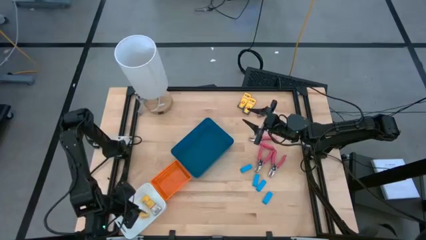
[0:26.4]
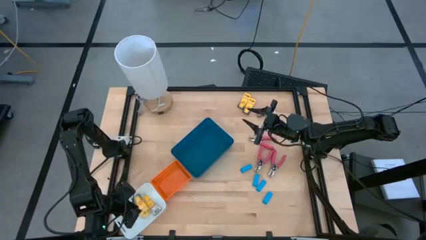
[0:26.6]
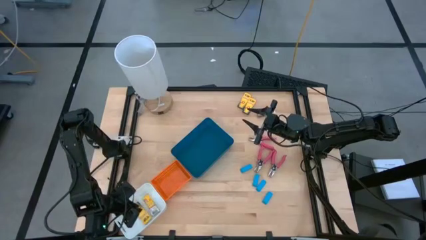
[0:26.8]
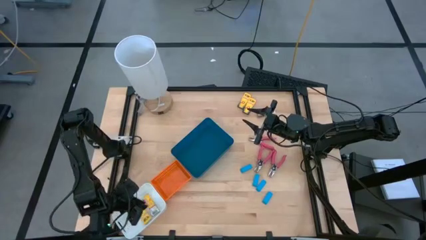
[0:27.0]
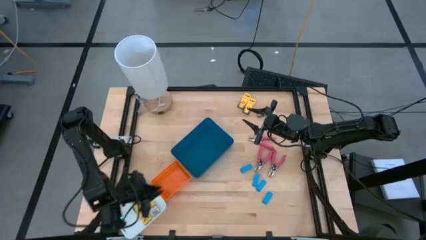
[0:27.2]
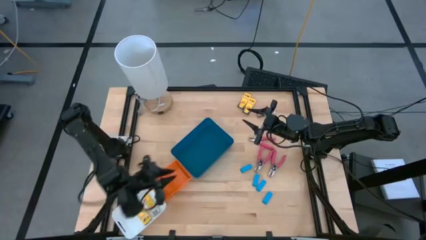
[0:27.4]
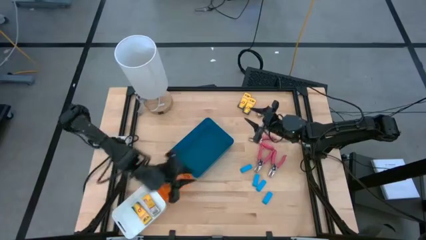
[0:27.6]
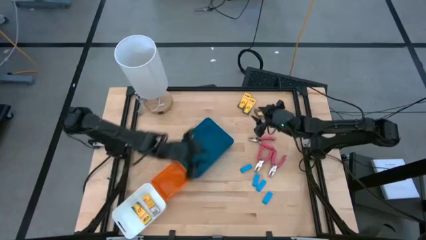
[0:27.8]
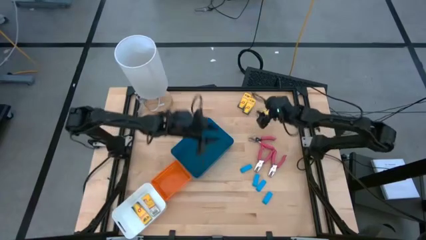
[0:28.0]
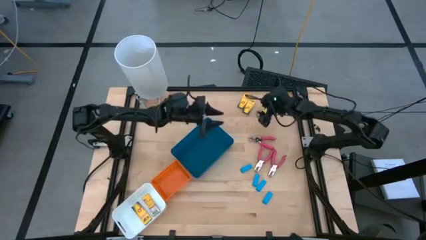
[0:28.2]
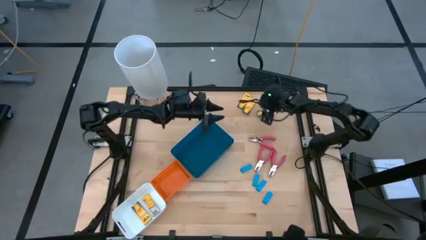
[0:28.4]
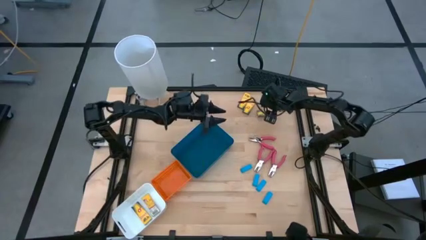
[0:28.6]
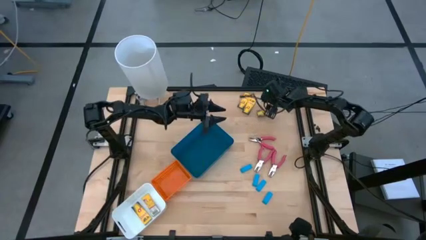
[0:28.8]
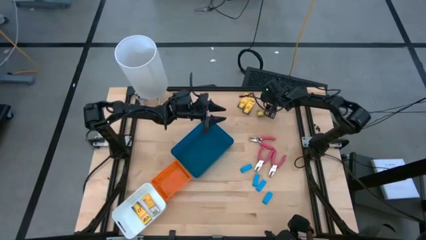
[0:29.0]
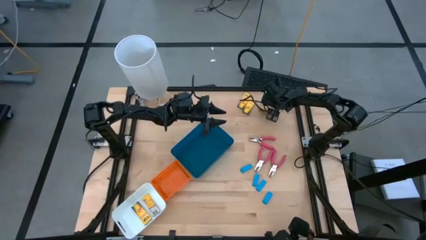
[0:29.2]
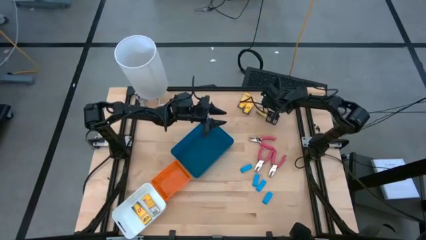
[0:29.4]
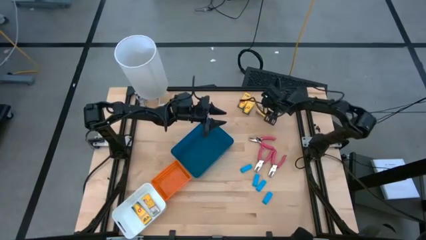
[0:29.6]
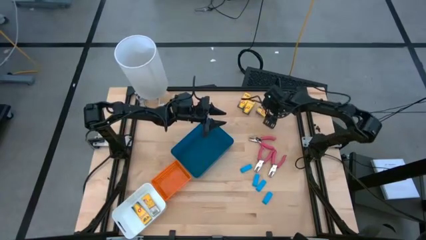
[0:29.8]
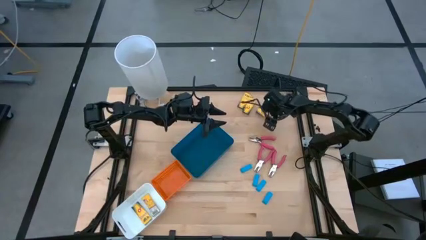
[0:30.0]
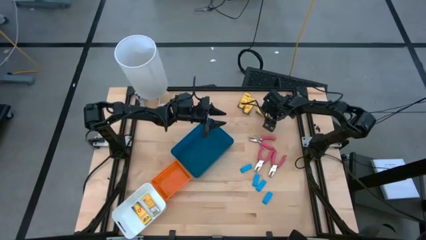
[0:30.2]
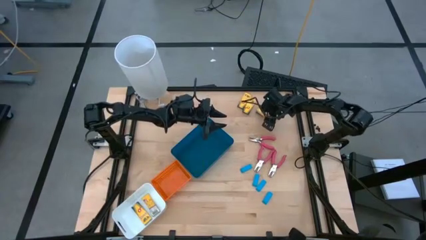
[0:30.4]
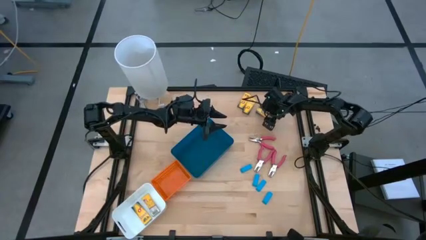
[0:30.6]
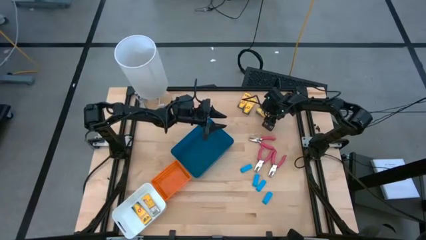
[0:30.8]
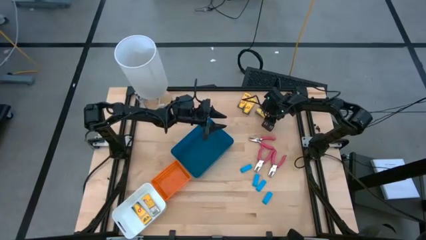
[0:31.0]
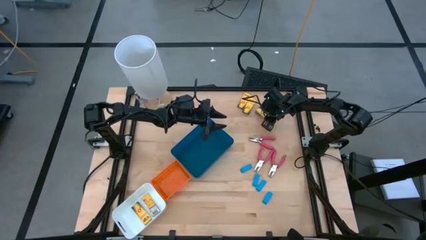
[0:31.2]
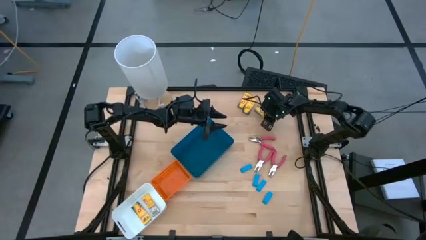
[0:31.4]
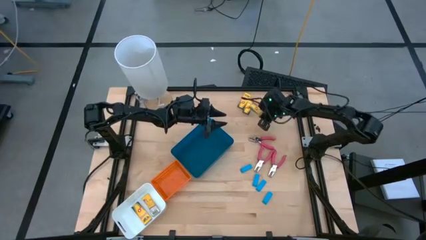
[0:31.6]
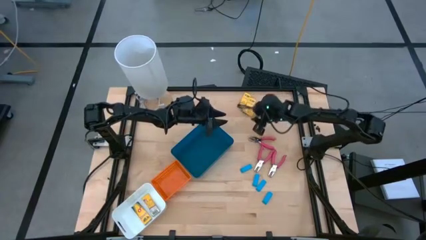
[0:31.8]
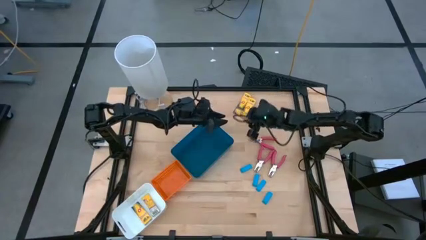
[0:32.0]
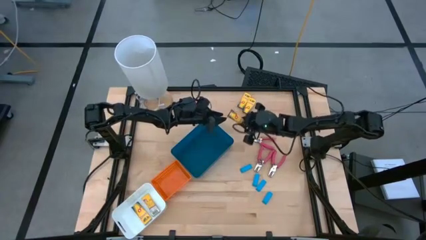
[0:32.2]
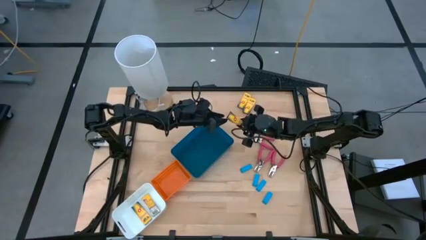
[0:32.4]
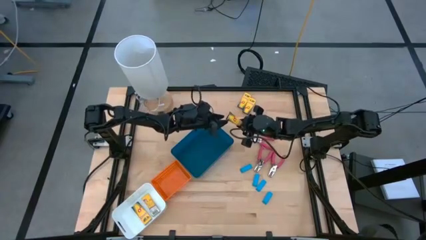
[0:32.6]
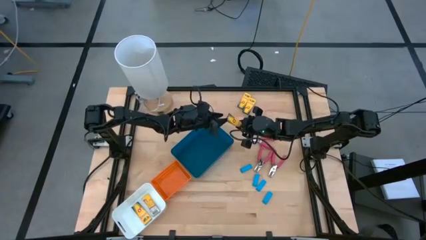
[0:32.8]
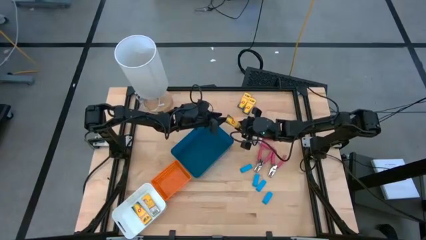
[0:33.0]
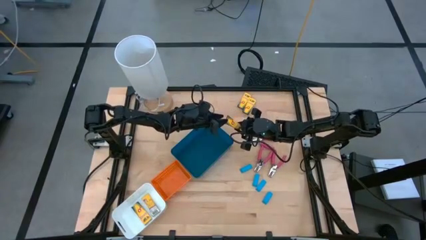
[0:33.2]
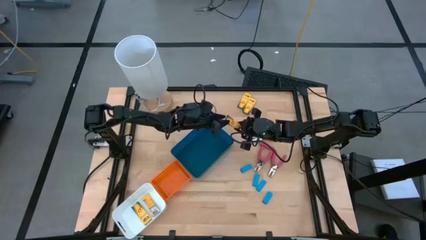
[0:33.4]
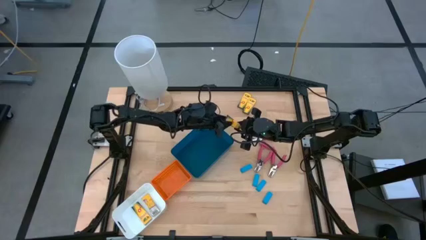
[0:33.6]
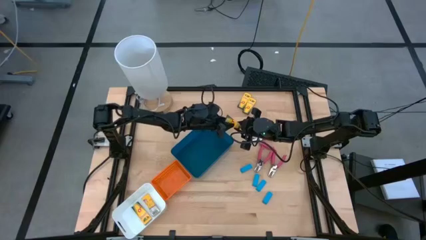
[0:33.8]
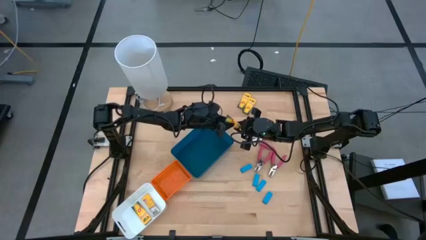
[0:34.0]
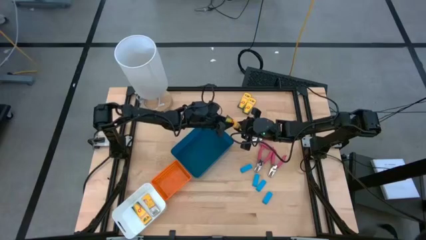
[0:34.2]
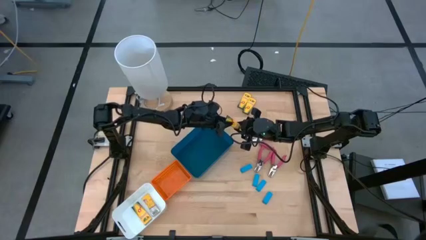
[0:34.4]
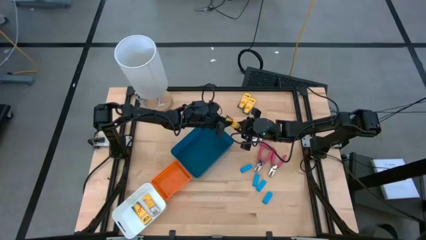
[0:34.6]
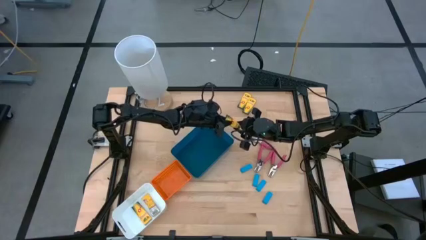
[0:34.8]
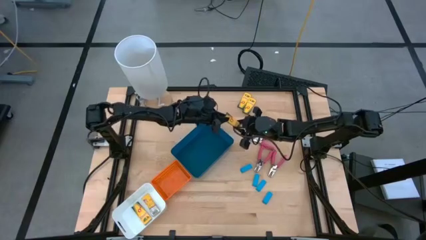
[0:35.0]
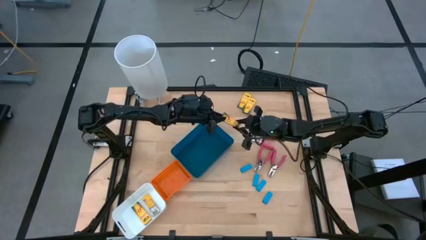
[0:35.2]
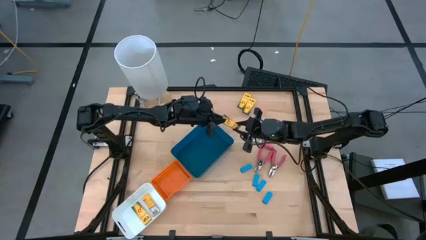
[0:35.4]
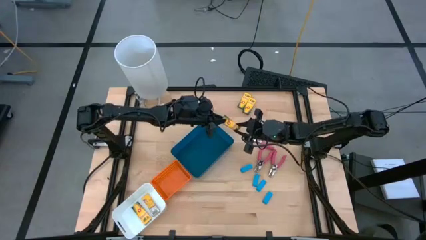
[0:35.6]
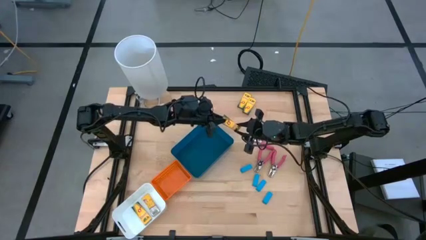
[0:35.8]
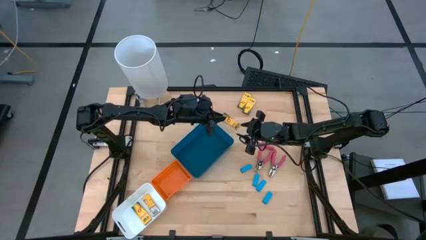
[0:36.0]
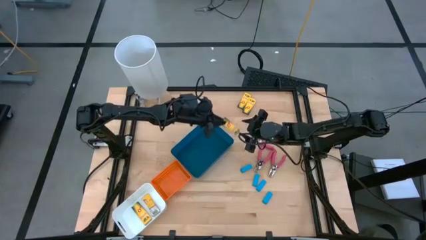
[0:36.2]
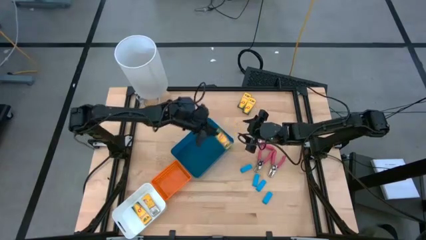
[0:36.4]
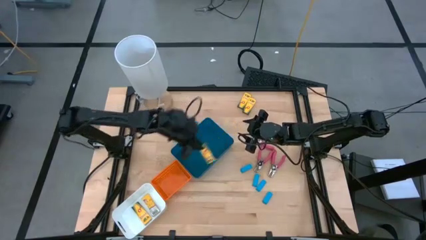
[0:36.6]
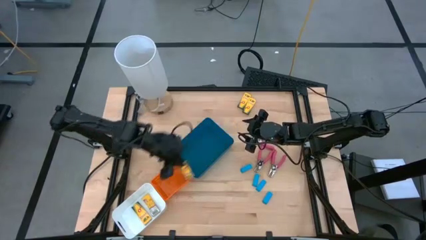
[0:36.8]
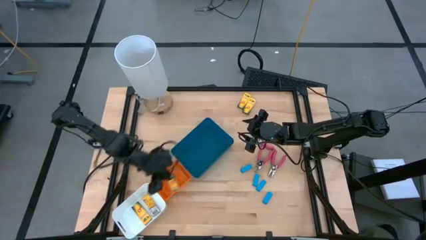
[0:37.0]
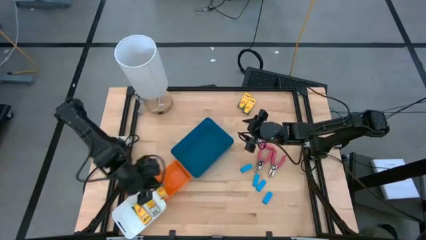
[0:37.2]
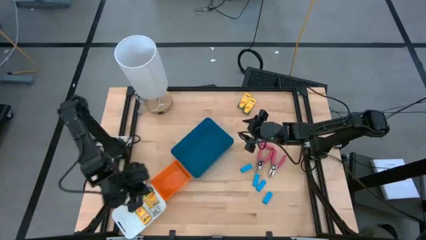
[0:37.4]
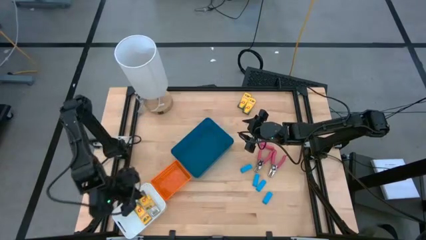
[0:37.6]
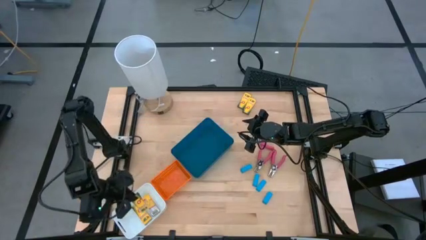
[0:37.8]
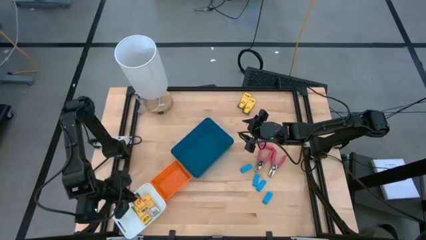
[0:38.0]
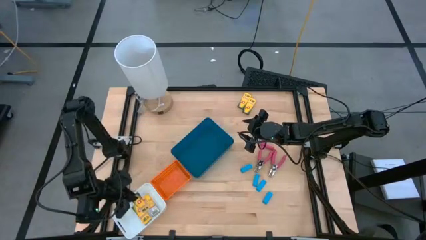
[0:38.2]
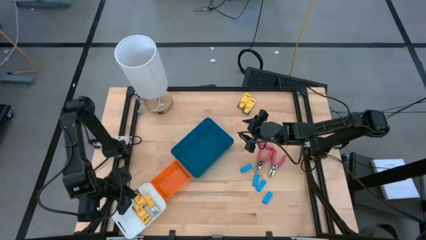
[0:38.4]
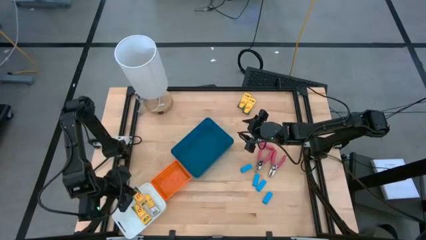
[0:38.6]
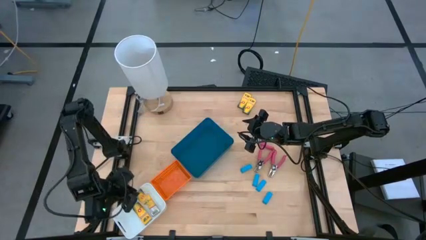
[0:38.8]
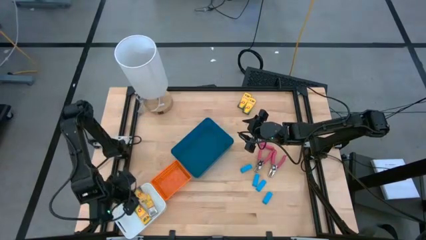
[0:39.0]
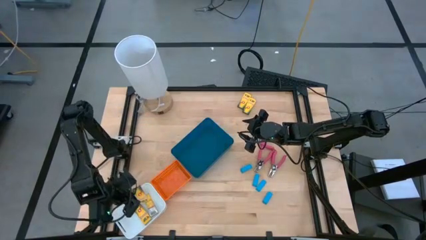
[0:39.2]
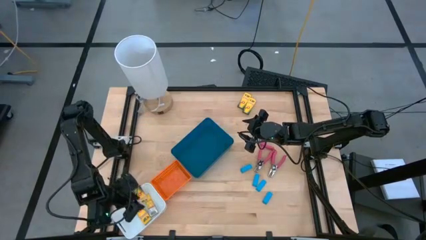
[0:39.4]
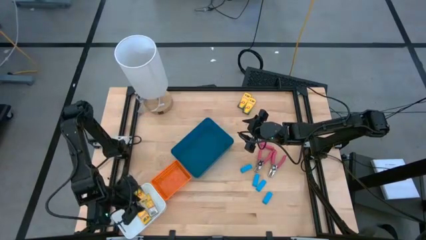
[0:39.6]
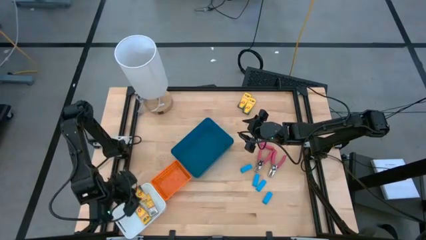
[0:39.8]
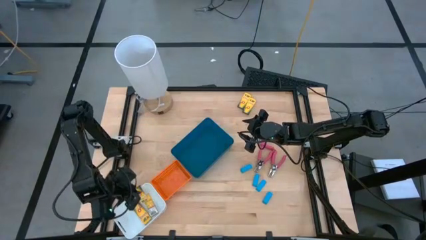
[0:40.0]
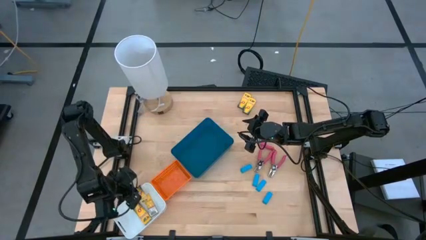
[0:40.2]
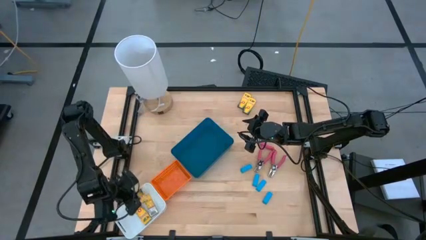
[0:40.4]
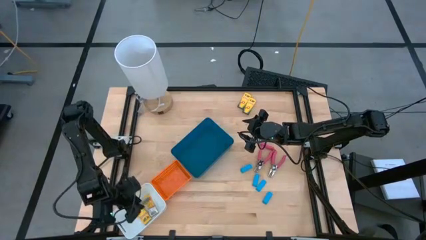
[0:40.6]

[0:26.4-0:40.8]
Task: Pick & Place School Supplies
Put the yellow crayon box into the white bin

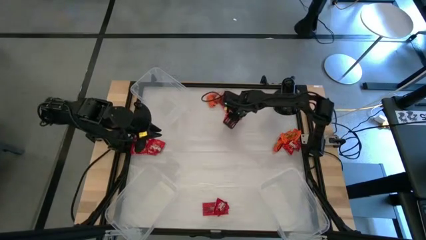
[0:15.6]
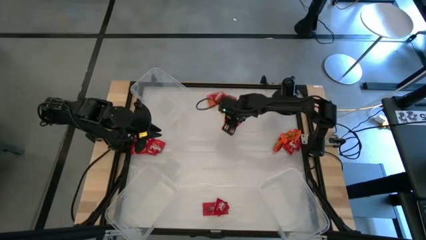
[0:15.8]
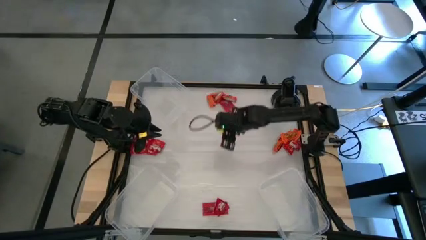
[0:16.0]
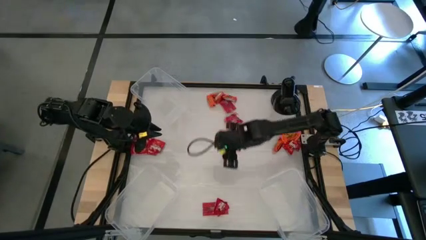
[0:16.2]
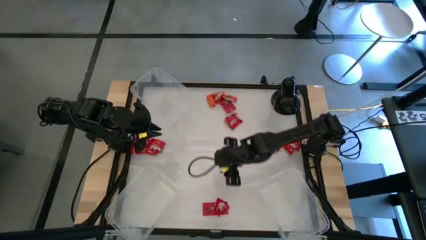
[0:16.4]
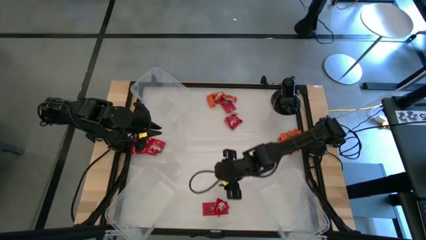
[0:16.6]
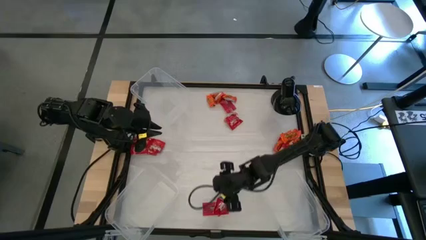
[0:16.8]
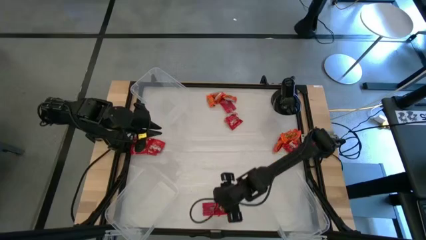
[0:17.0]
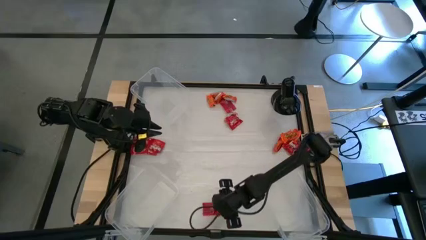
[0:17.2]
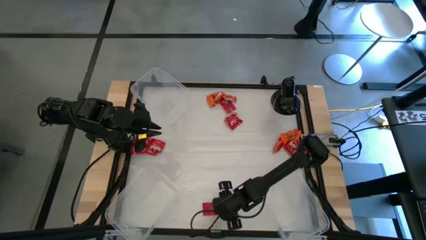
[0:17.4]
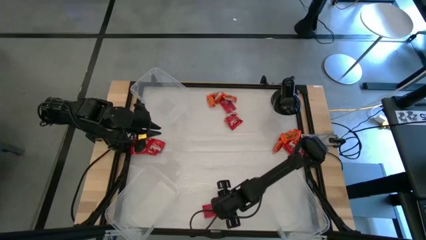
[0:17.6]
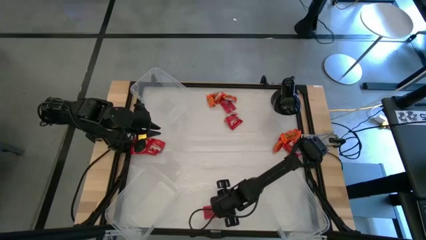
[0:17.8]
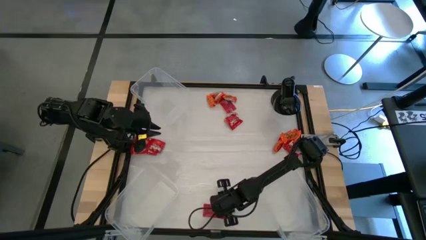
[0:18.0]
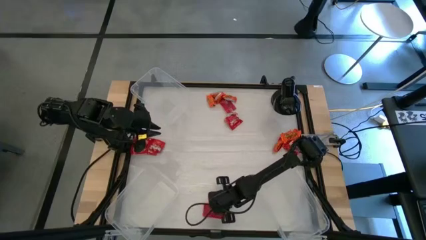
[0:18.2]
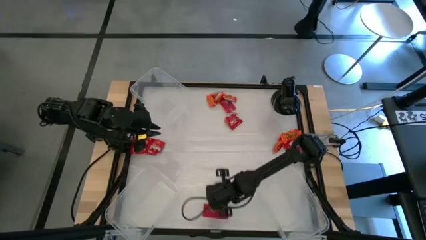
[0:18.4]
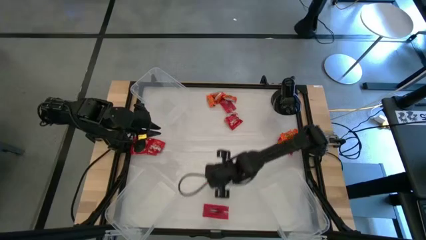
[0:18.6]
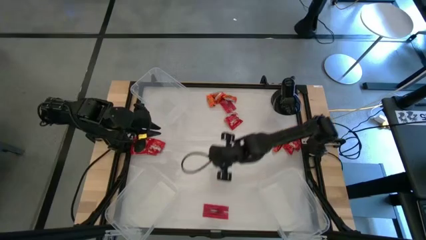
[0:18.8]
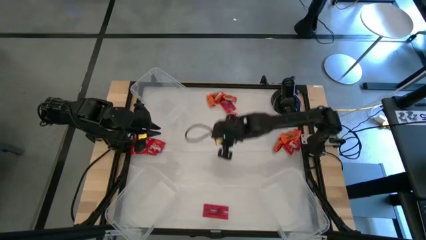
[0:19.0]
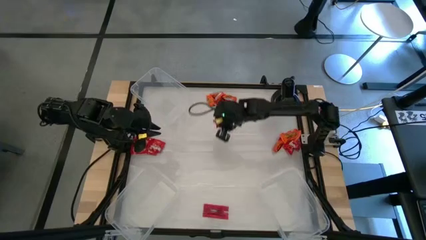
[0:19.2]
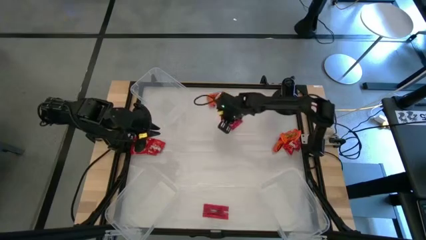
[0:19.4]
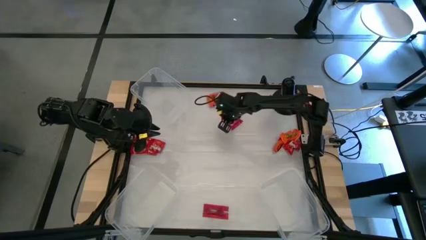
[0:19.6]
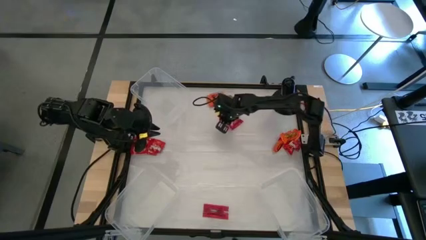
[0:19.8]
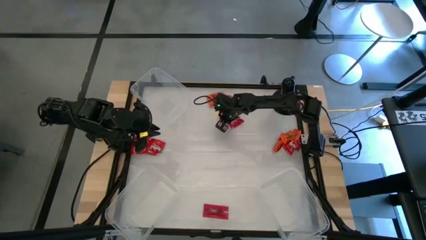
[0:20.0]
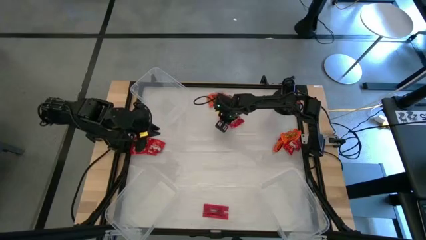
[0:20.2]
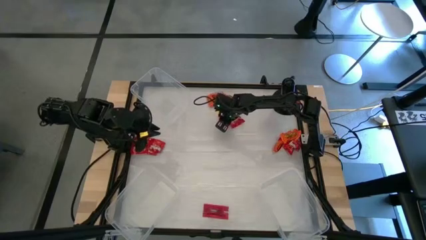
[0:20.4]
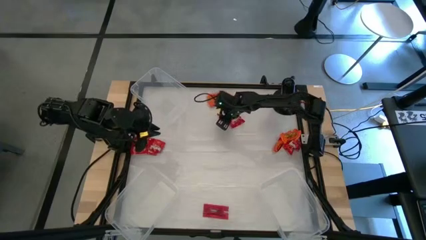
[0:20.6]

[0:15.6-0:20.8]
Task: Sort candy
Move the red candy to the top center of the table
